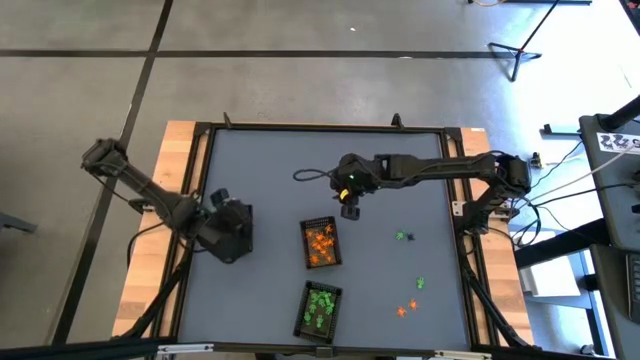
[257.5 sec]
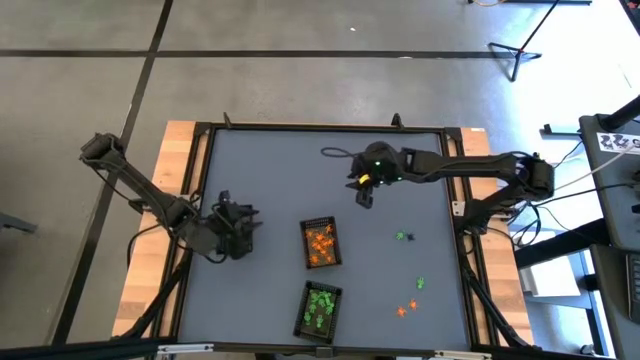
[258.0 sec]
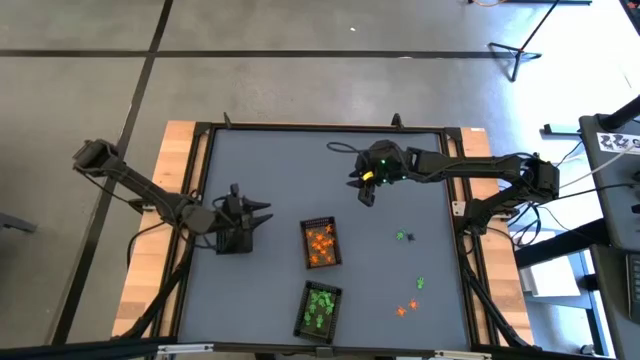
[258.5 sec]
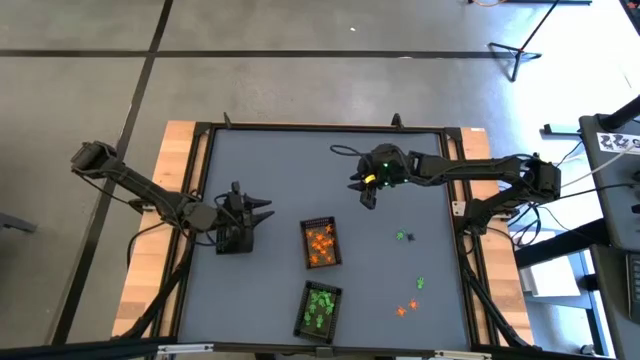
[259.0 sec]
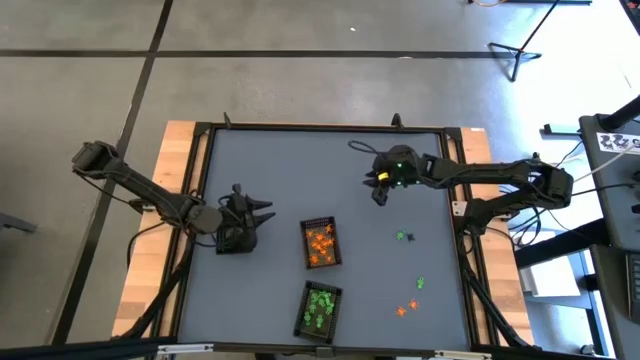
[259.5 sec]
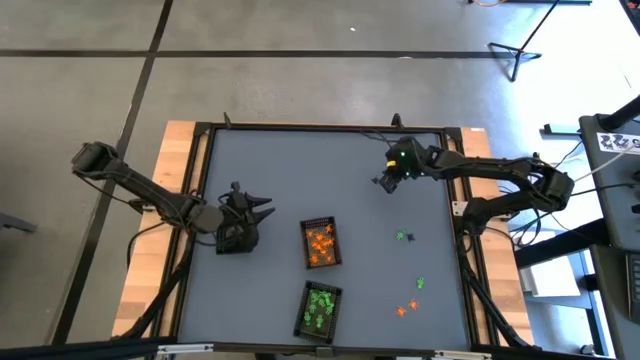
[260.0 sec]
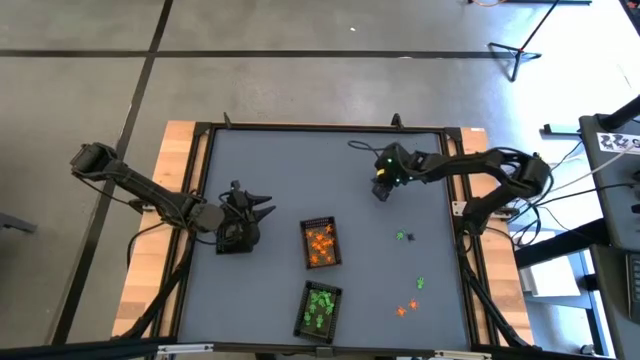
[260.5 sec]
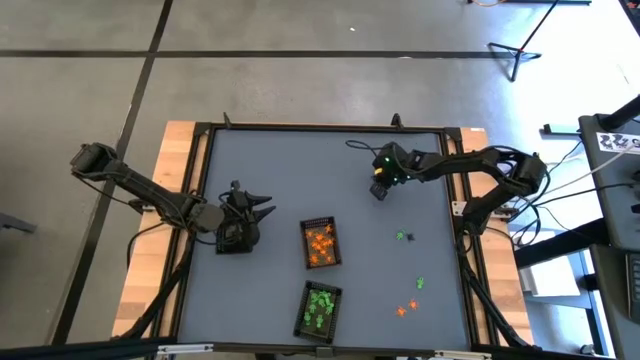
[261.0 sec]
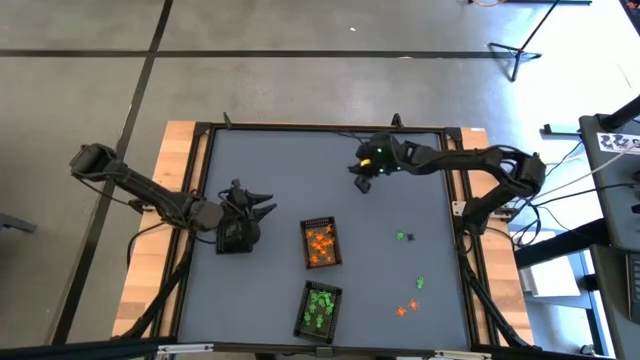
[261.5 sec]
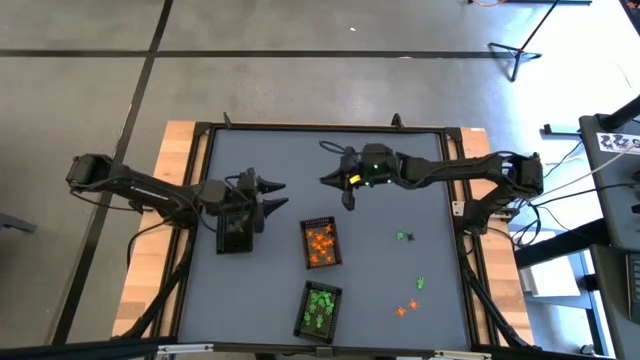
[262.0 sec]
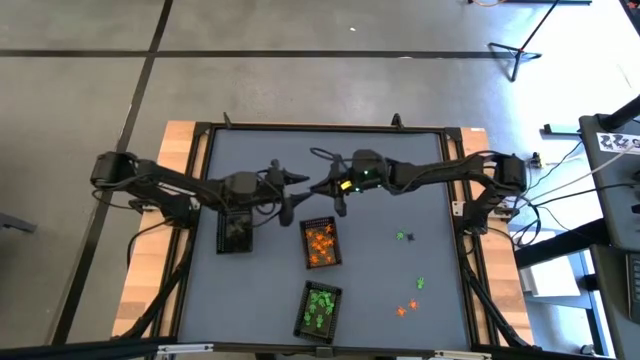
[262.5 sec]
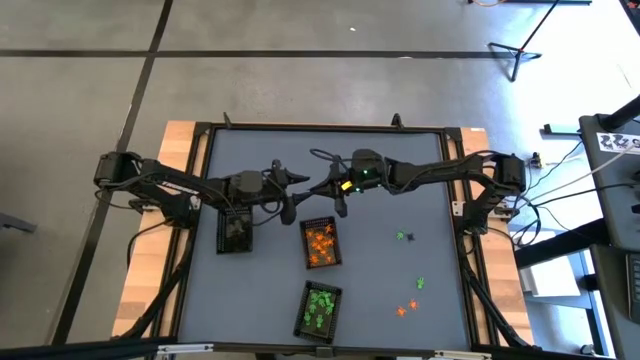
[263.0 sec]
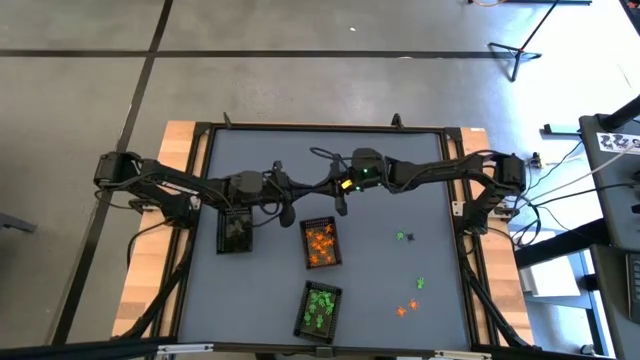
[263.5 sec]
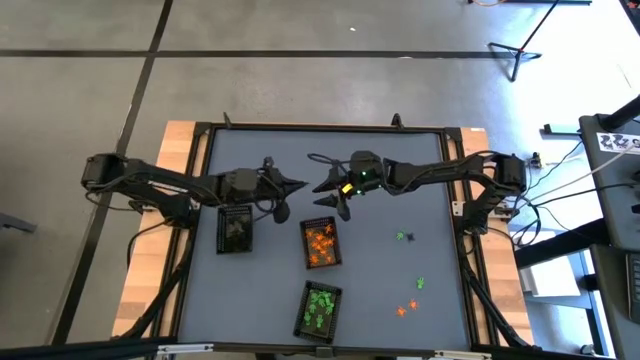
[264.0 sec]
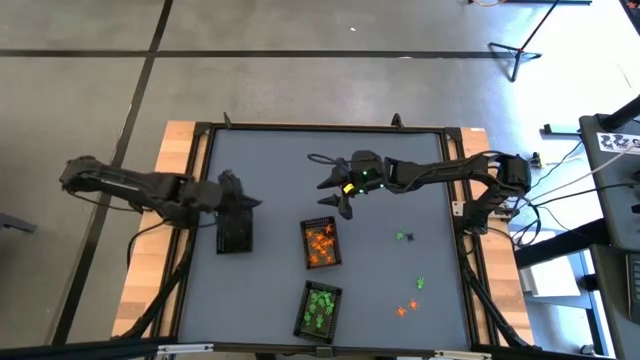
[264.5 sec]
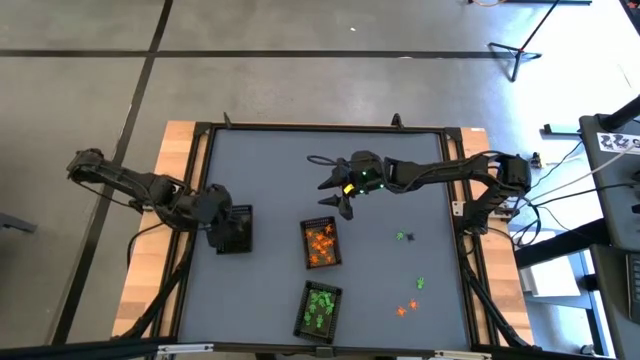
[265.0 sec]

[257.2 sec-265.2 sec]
Task: Sort Halloween decoration
Put the black spider toy into the top left black basket

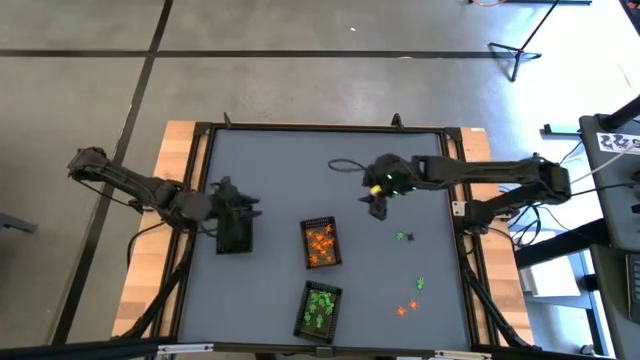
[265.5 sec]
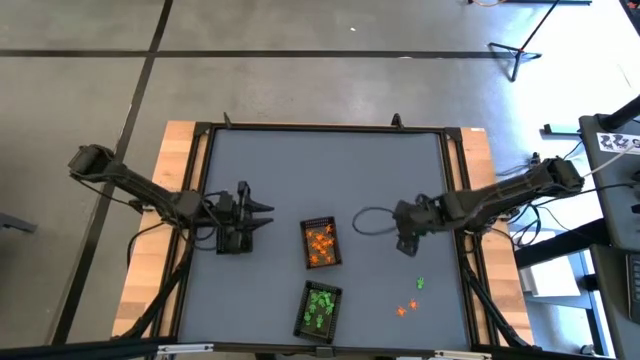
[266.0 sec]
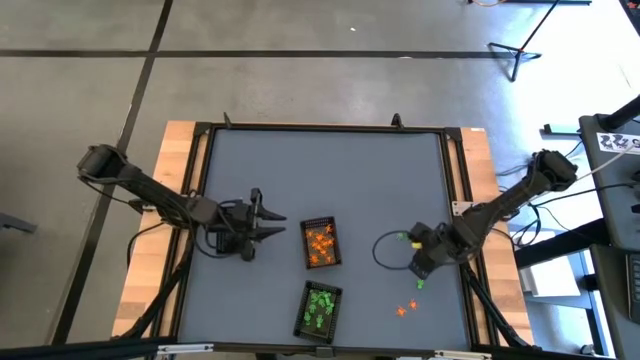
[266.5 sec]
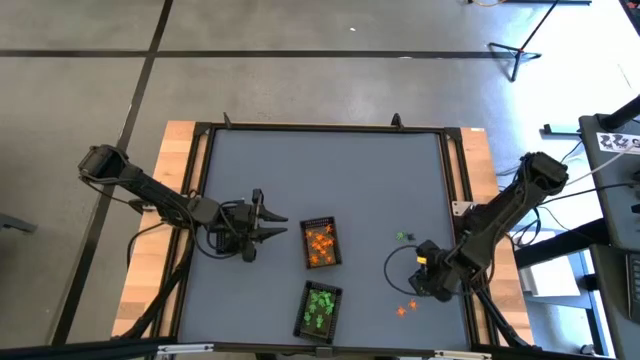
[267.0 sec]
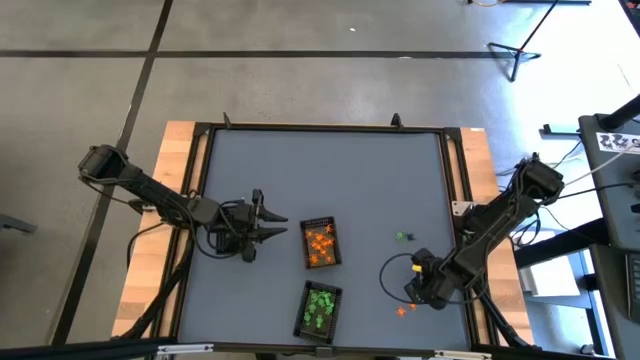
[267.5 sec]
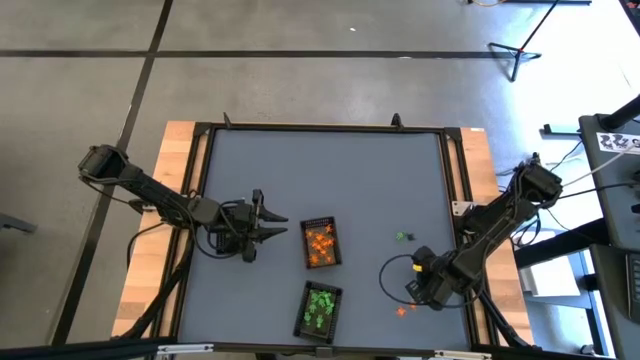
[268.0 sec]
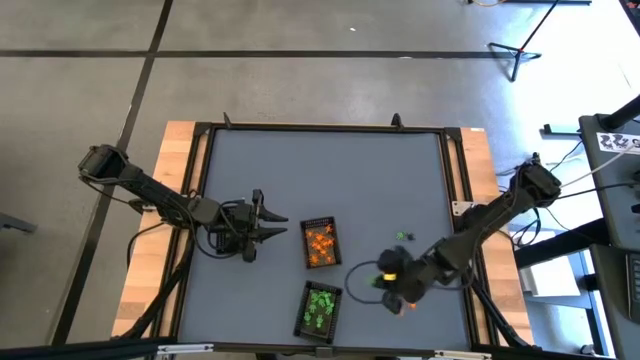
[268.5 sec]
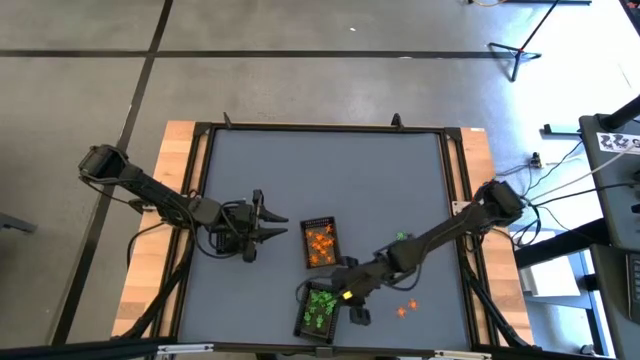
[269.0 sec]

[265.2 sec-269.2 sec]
Put the green toy skeleton into the bottom black basket

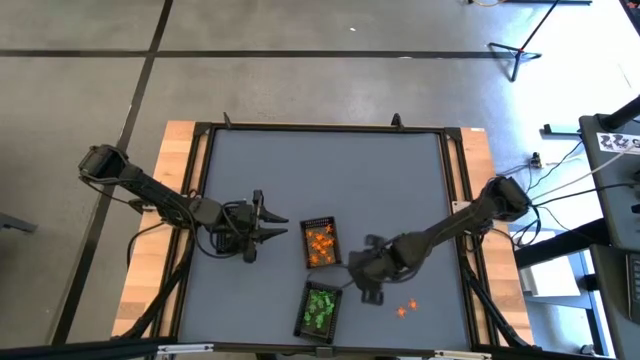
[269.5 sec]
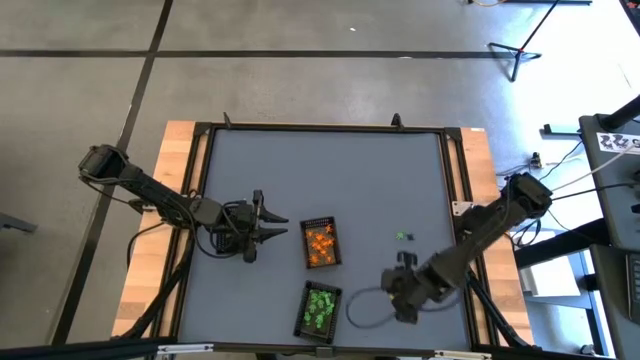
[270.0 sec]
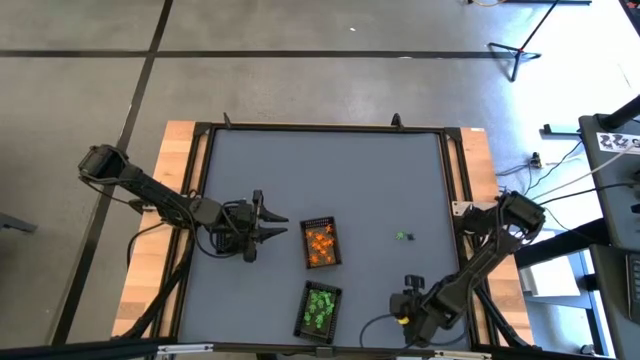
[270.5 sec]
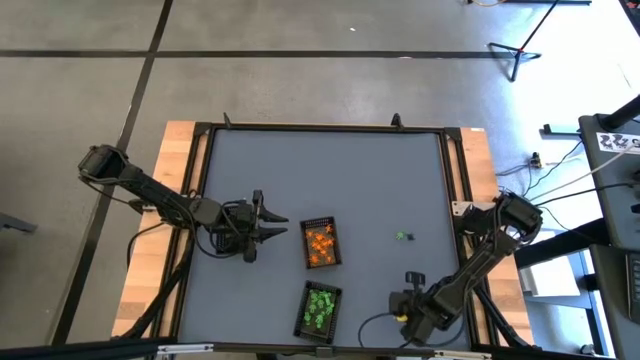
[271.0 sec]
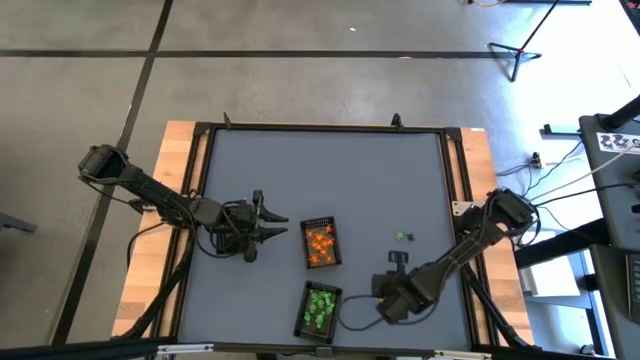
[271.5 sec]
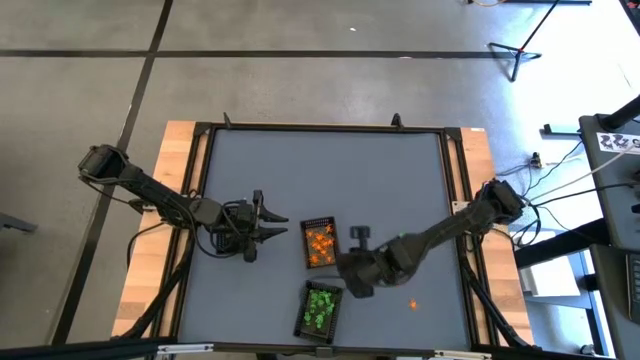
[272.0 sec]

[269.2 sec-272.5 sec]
Put the green toy skeleton into the bottom black basket

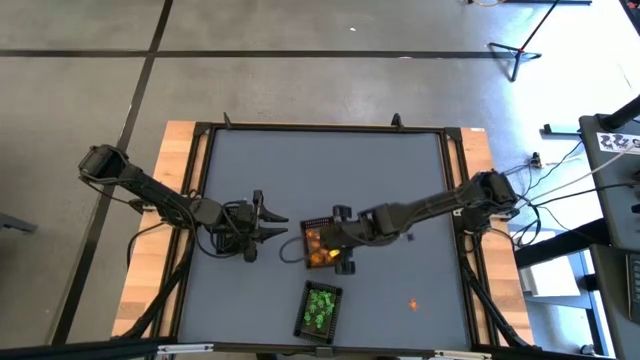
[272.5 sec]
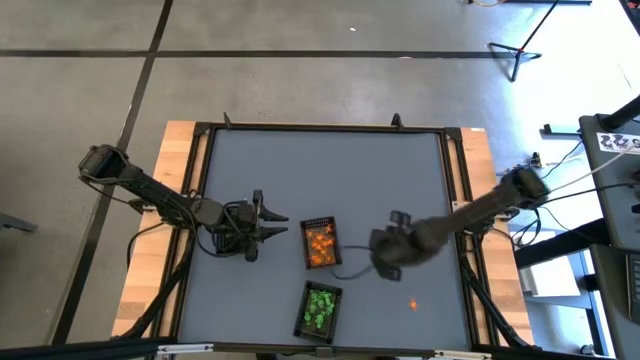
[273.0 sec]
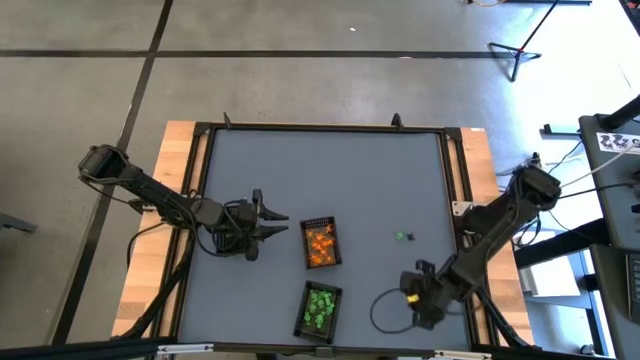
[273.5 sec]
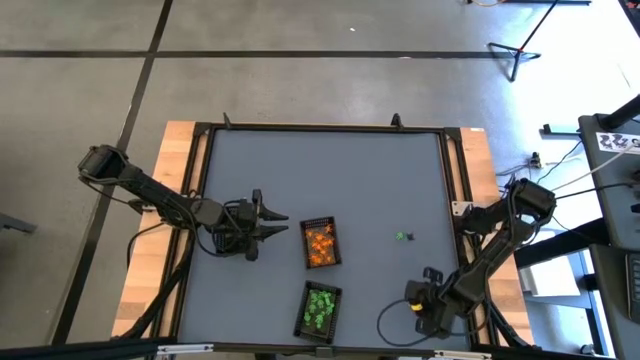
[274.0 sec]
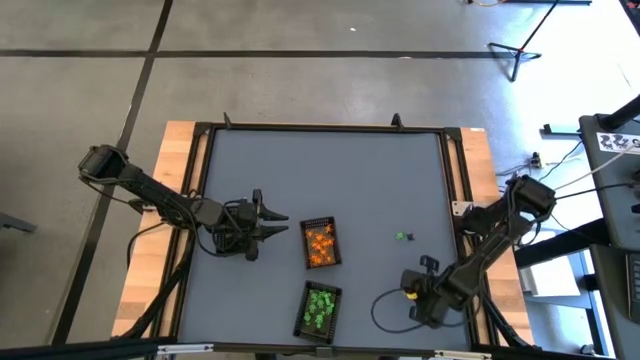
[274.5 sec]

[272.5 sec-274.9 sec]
Put the orange spider toy into the top right black basket

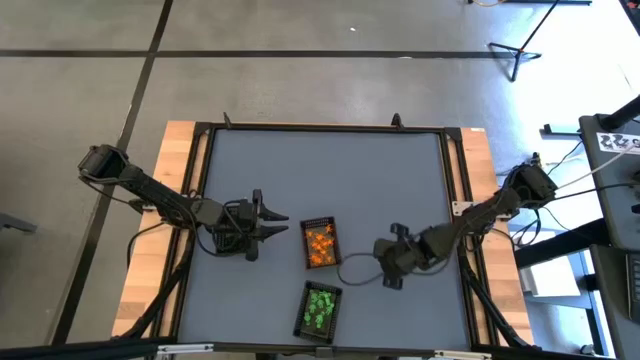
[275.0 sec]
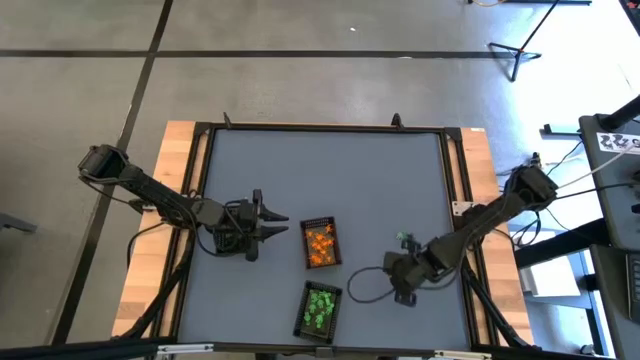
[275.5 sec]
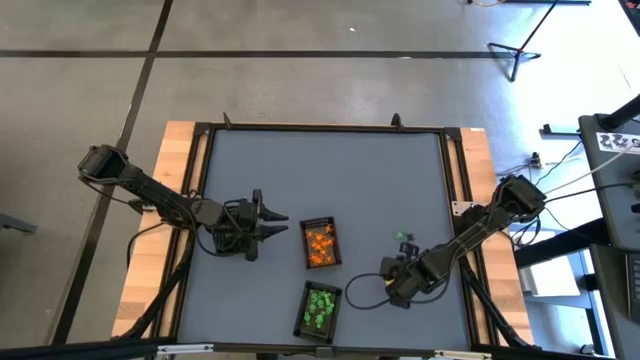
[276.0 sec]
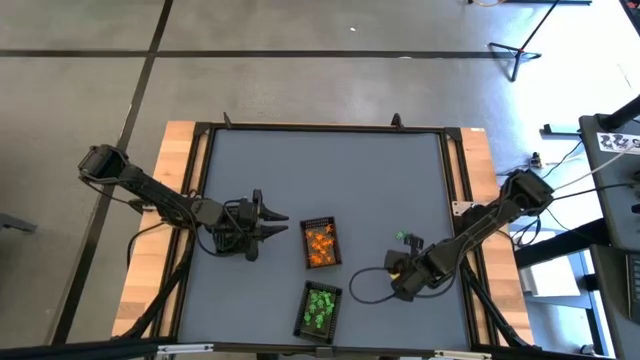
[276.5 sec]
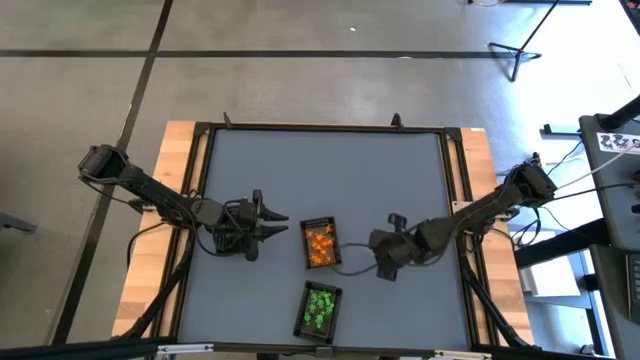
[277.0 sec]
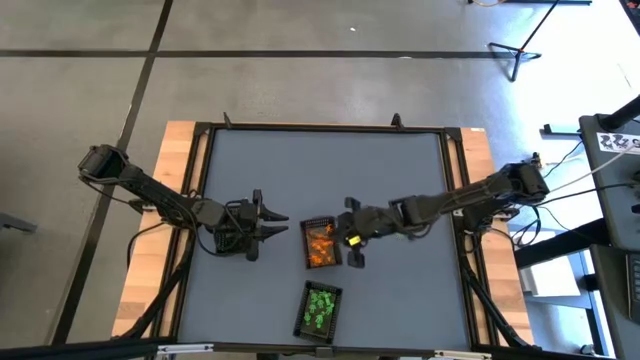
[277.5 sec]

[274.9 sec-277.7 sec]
Put the orange spider toy into the top right black basket
